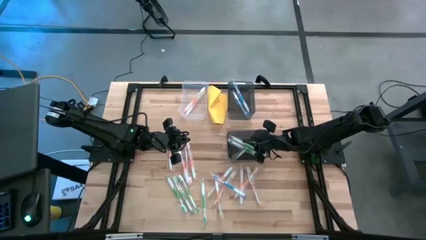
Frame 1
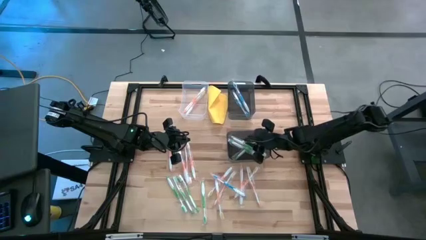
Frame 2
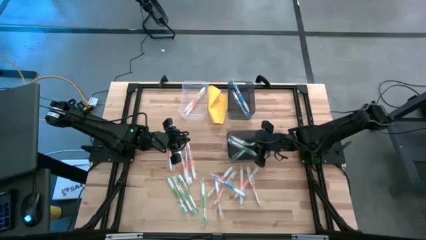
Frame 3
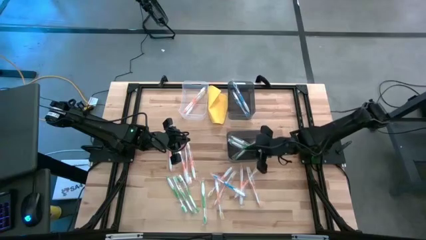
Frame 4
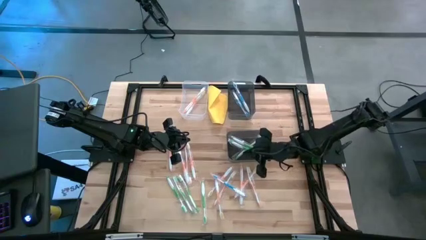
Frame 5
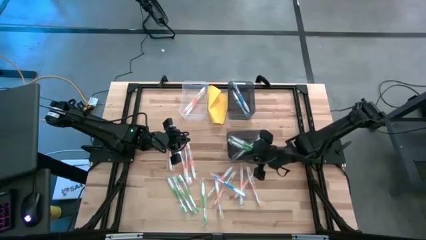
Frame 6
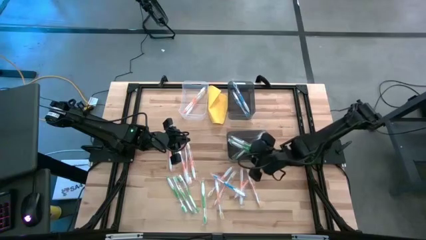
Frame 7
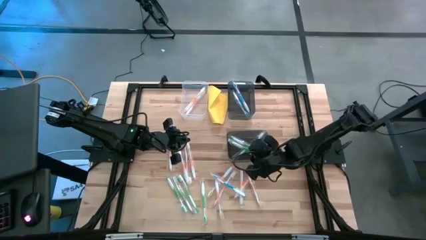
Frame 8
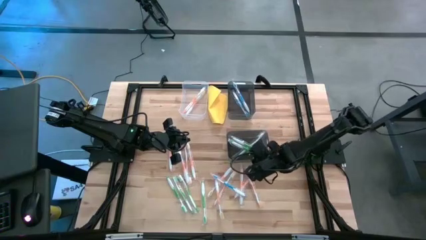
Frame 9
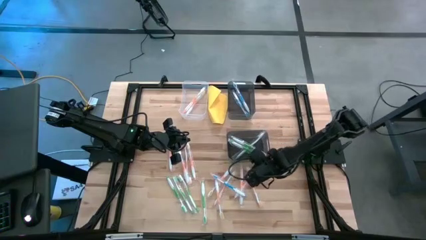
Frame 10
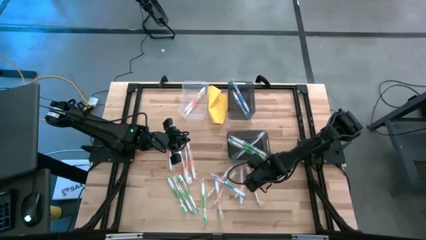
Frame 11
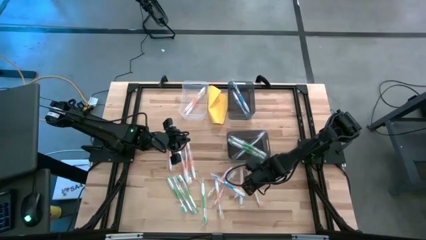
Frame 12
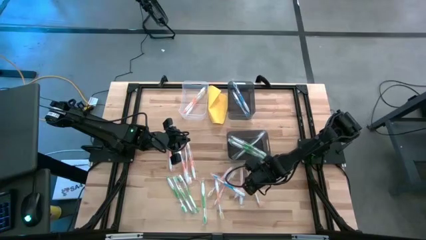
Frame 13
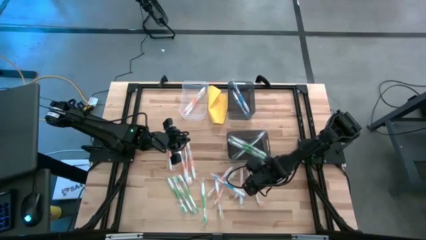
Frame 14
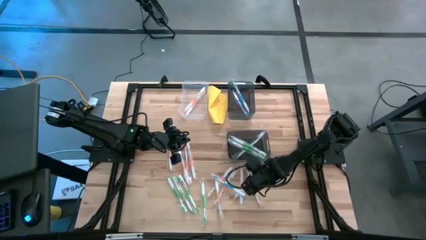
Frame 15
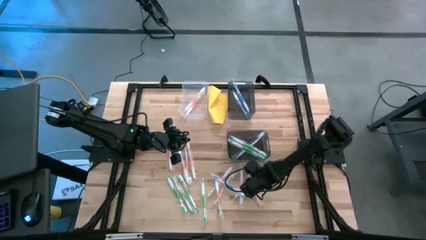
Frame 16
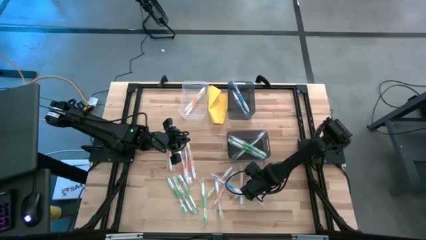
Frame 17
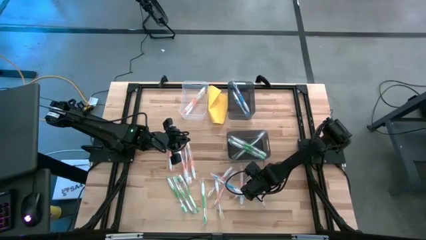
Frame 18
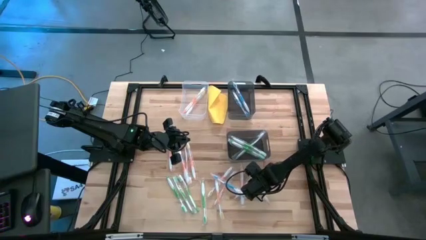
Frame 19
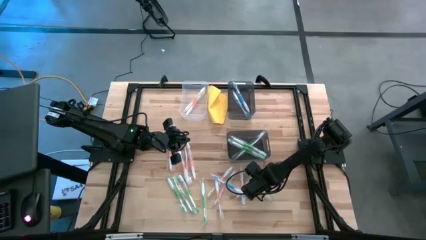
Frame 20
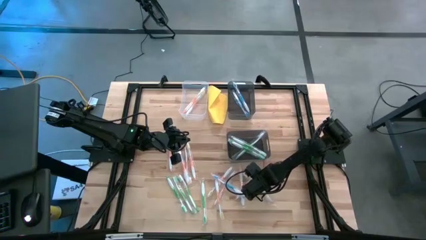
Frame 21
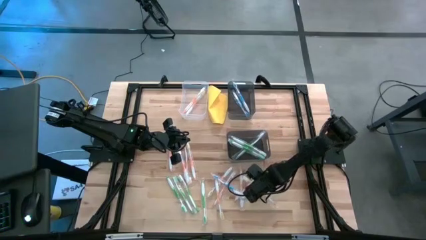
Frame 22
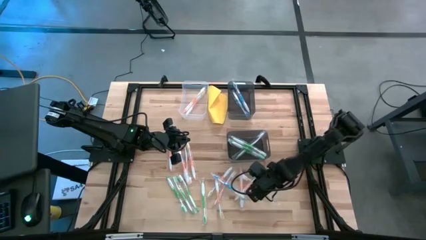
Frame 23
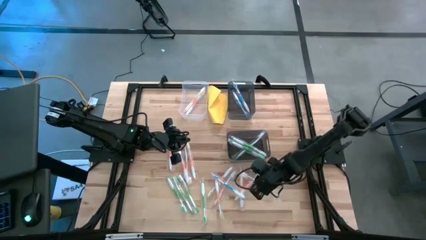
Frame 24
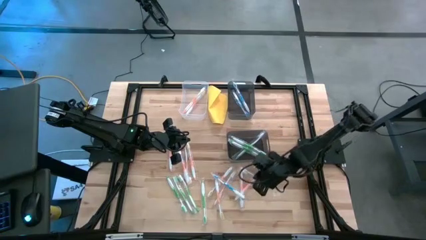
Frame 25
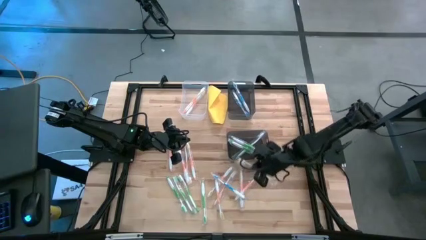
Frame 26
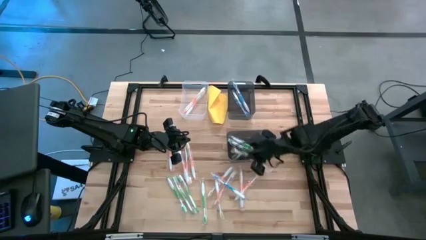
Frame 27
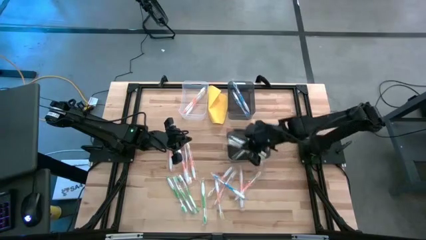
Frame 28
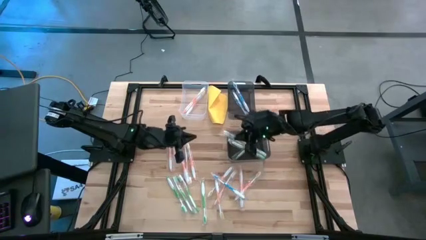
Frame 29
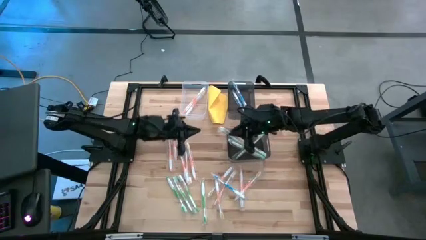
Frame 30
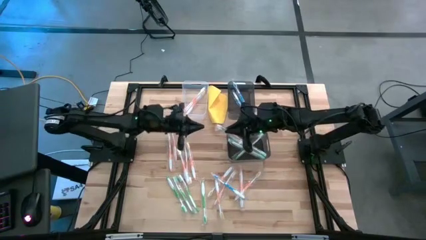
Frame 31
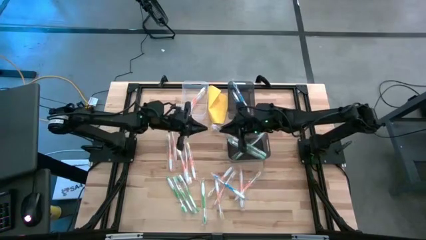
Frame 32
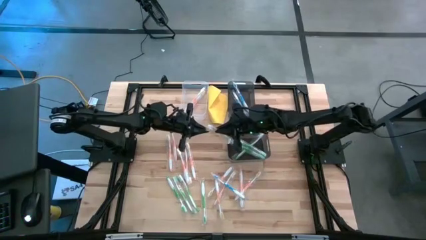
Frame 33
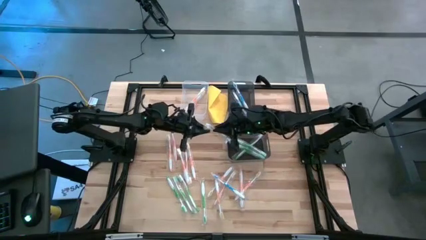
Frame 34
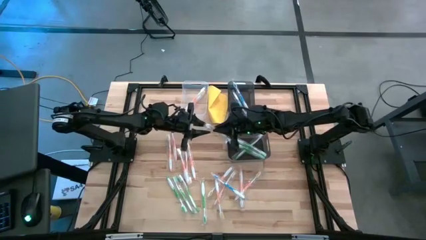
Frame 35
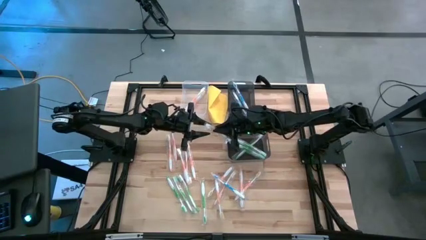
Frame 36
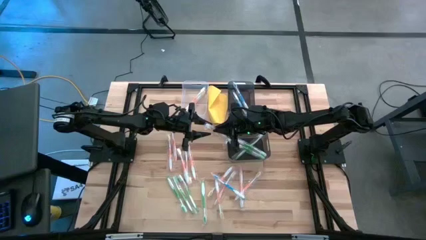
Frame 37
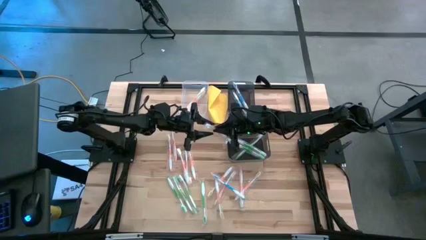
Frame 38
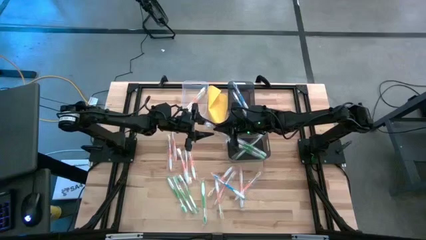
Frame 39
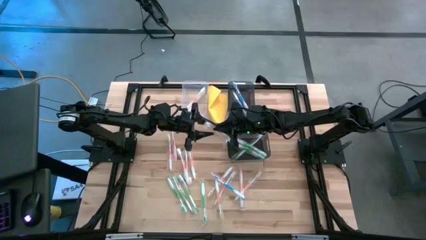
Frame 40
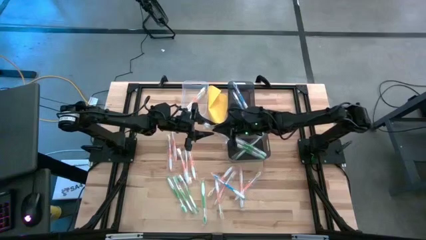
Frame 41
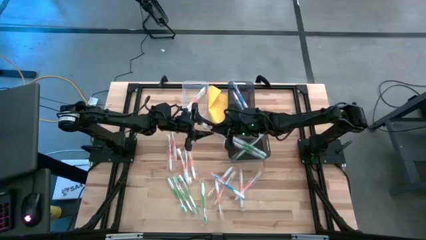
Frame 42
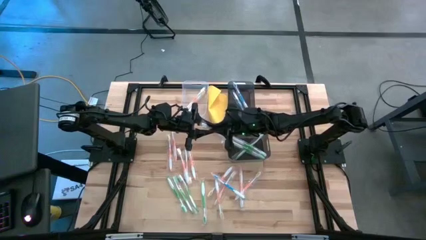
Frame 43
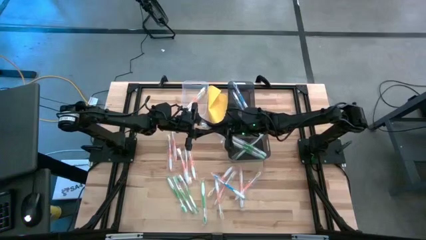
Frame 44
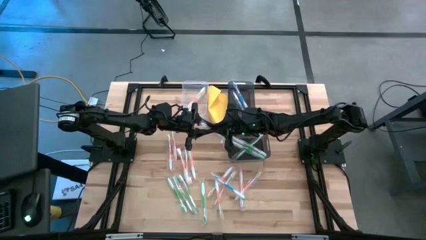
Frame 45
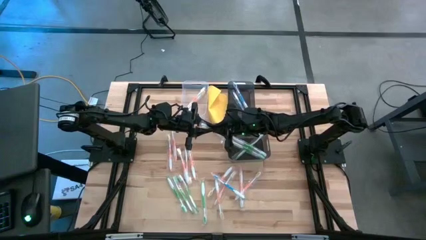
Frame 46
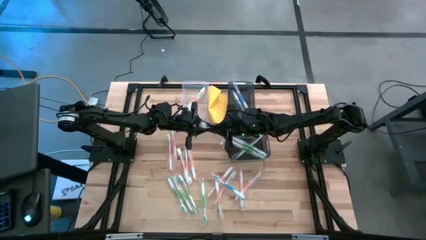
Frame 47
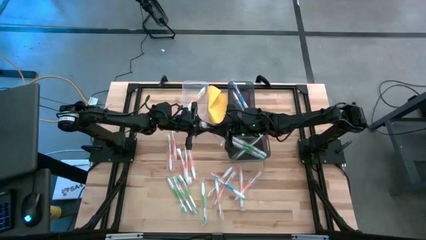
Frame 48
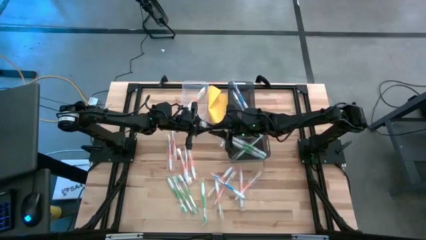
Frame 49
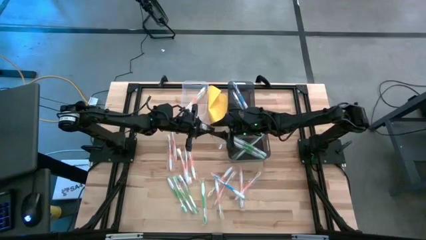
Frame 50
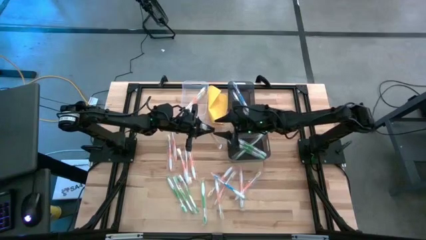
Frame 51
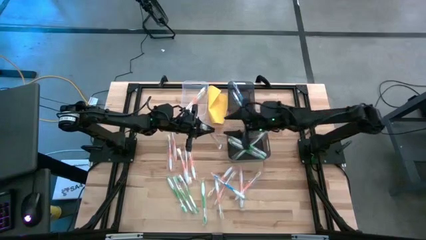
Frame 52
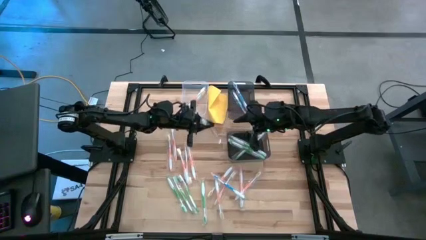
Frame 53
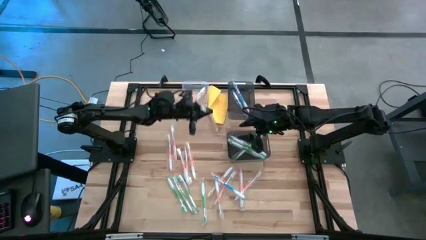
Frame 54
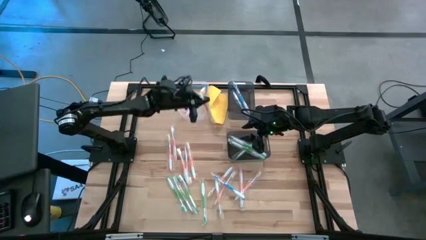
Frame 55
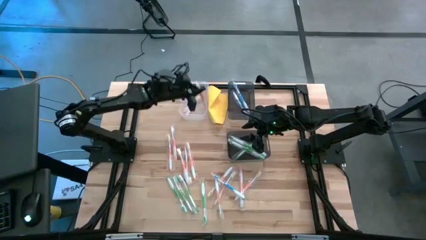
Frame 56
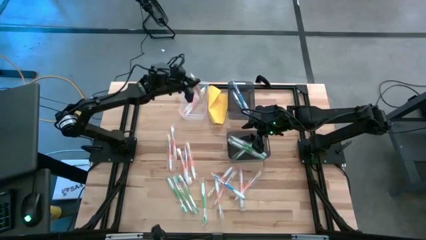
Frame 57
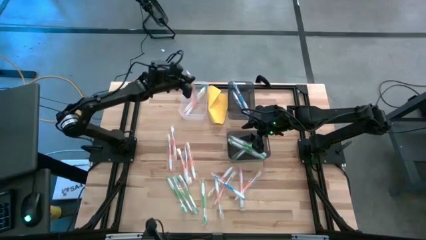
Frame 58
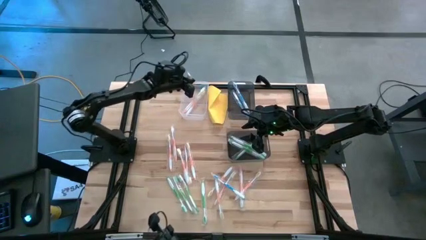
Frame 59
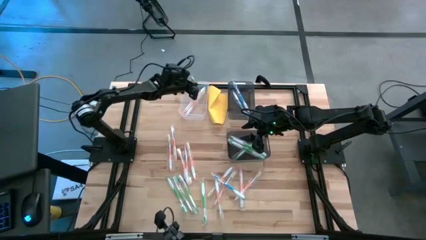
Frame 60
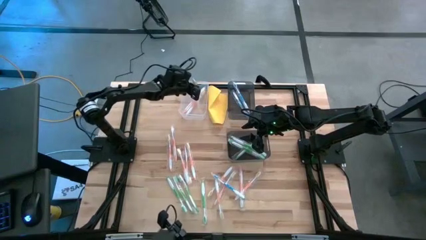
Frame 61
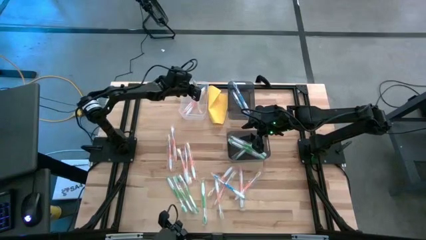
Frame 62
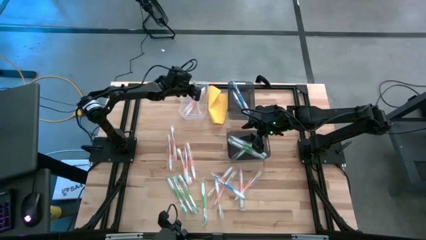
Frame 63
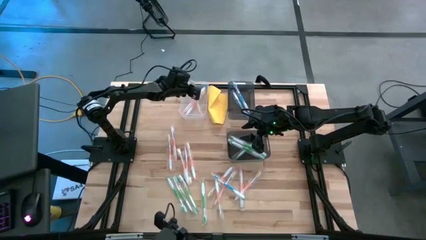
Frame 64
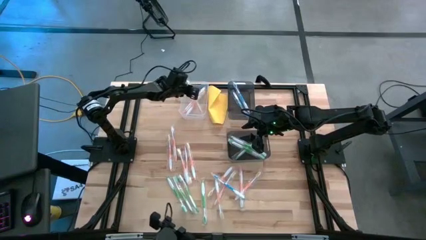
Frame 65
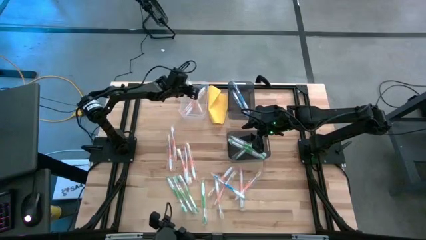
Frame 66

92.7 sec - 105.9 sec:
Task: Pick & Place Toothbrushes
Put the orange toothbrush into the transparent bin

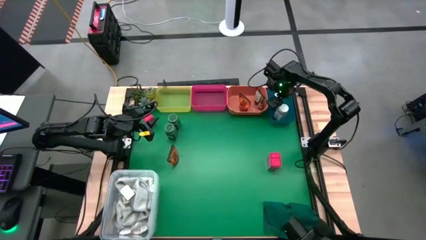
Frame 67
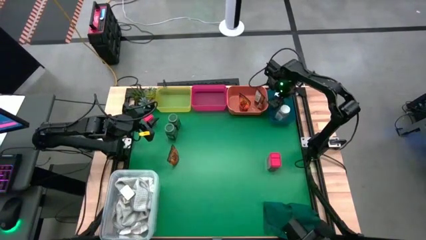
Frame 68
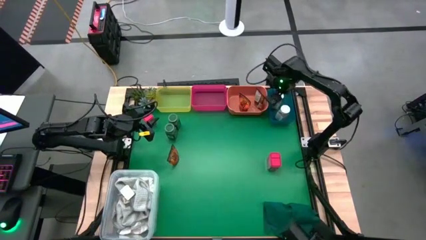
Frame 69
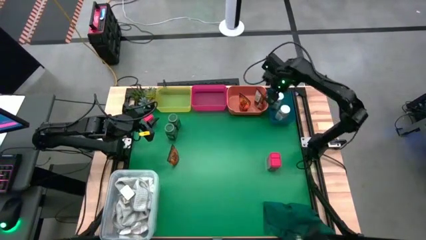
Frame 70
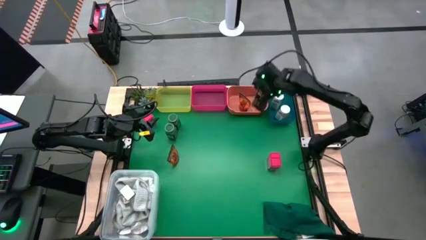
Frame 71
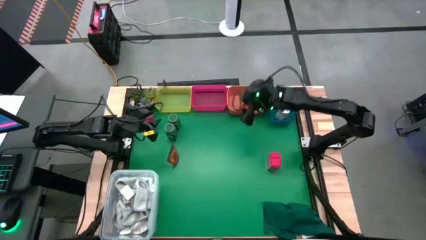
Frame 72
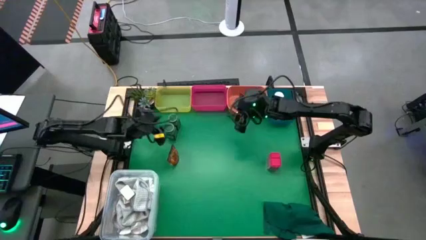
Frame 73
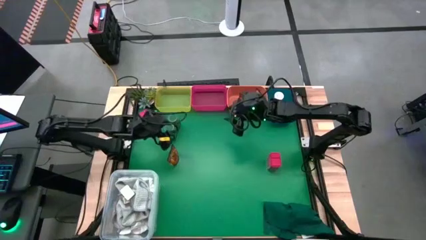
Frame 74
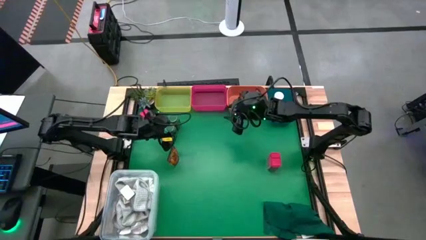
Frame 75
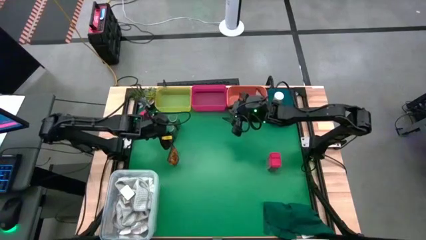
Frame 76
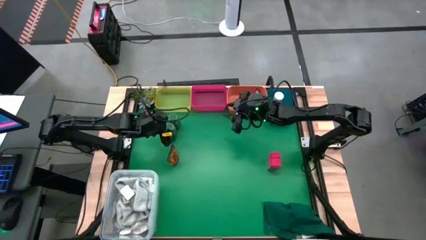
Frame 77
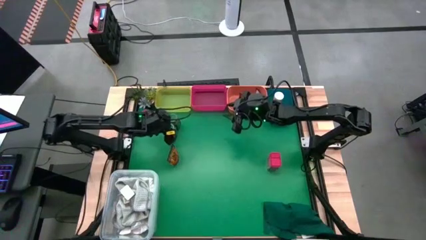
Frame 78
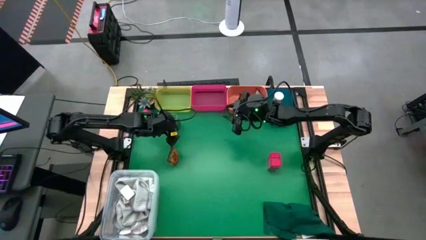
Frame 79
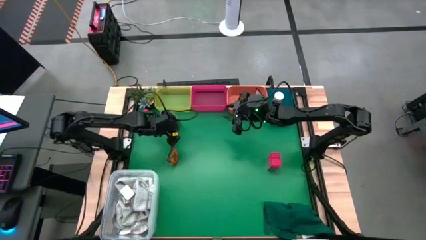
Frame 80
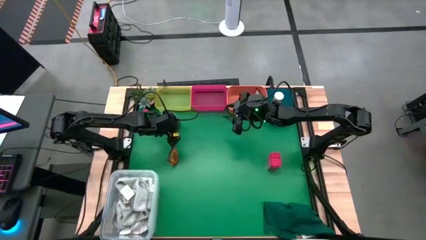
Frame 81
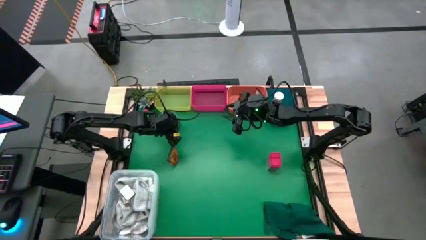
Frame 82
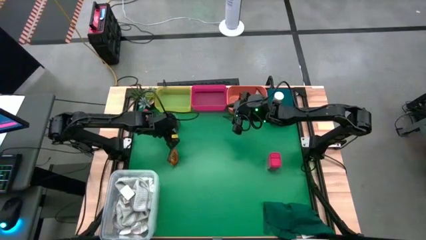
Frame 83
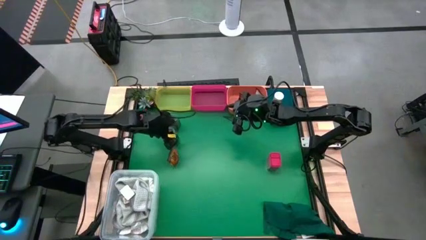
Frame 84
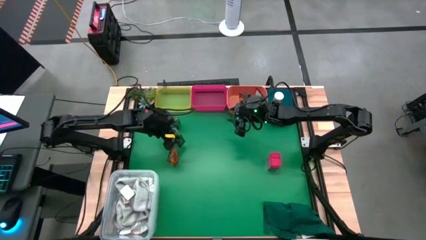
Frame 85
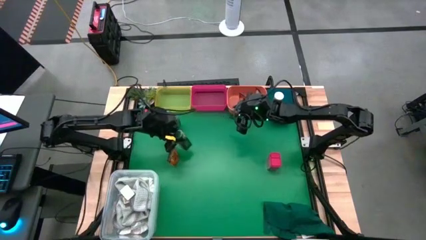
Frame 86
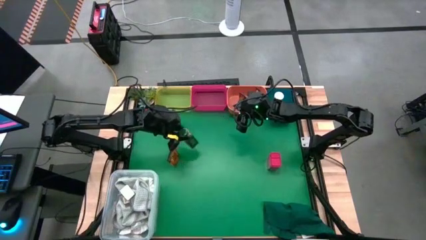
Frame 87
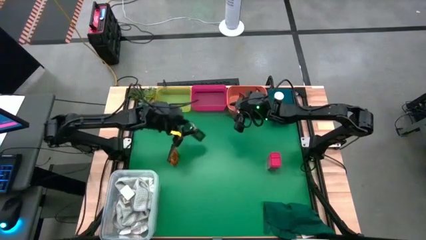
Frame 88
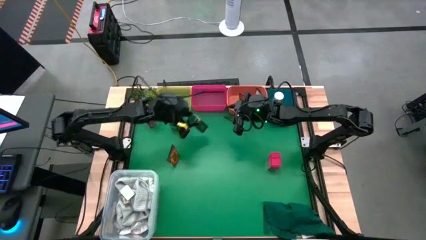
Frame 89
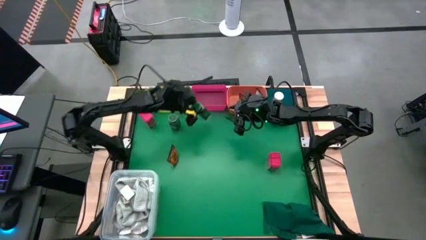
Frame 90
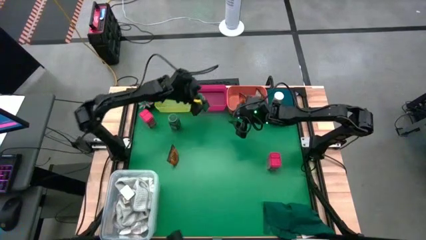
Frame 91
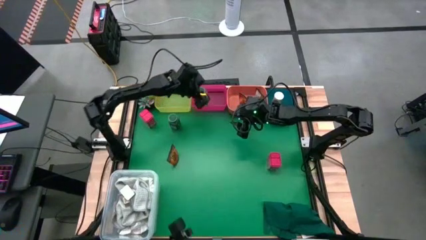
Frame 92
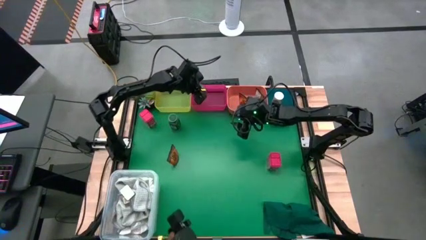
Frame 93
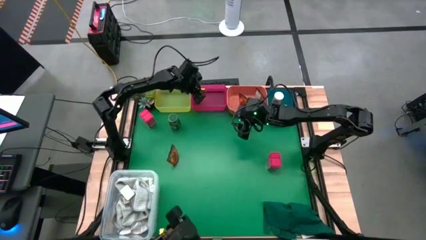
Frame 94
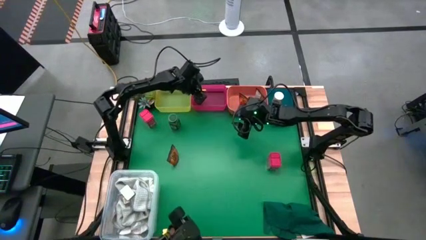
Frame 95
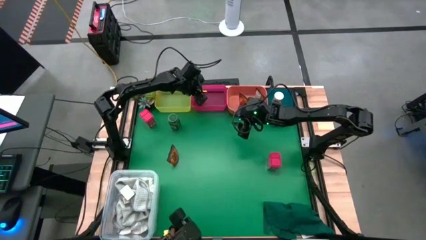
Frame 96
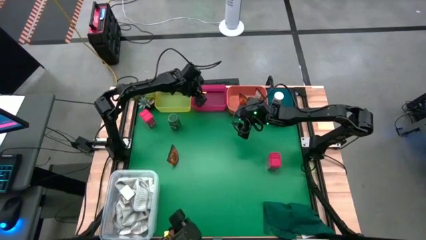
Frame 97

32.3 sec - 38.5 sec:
Task: Sort spices by type
Put the bottom green seasoning into the red bin
